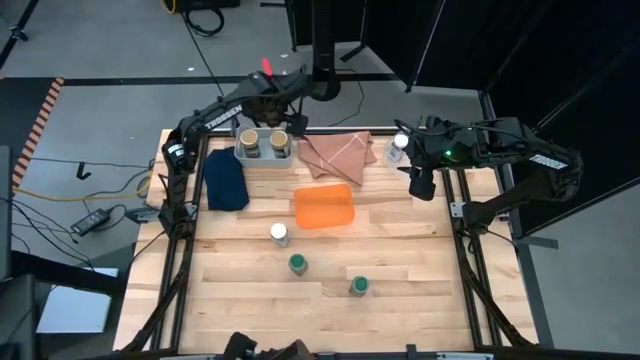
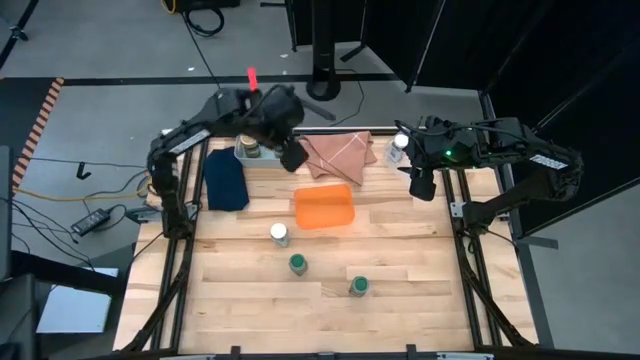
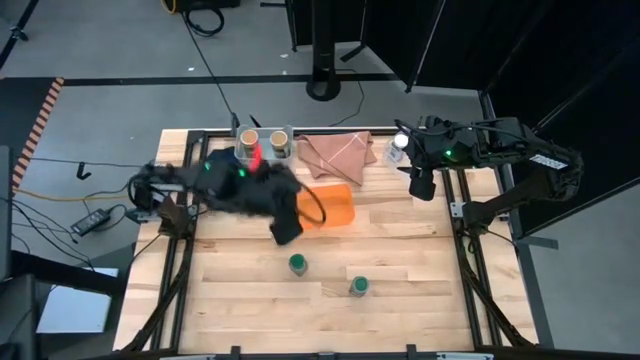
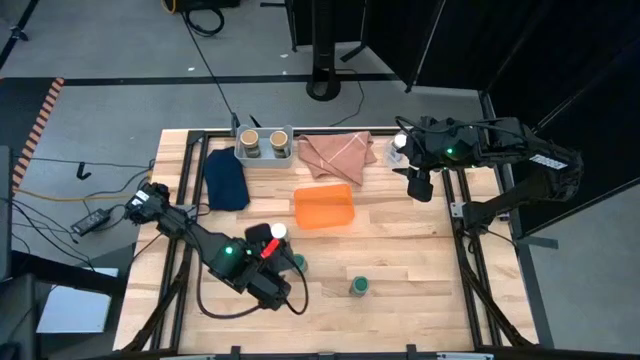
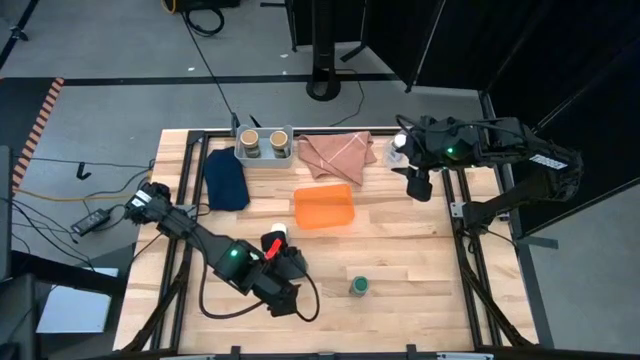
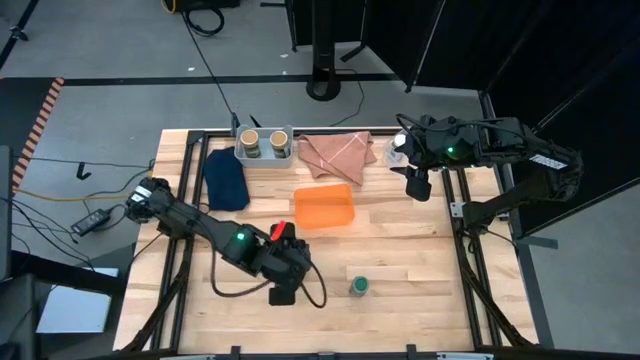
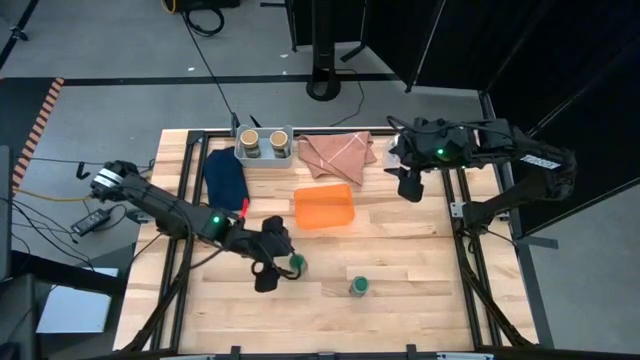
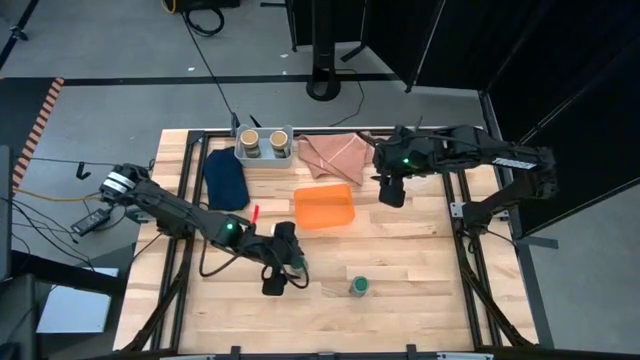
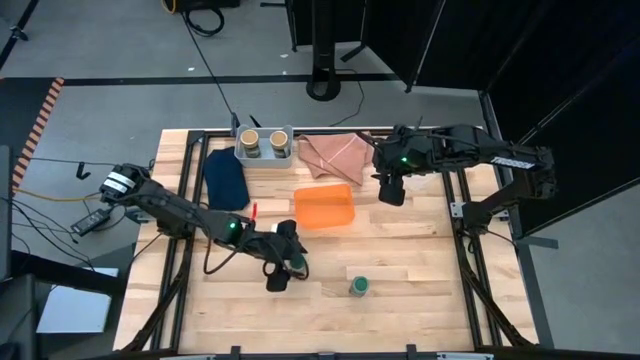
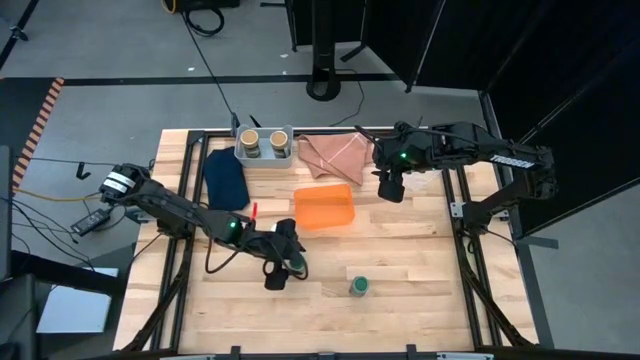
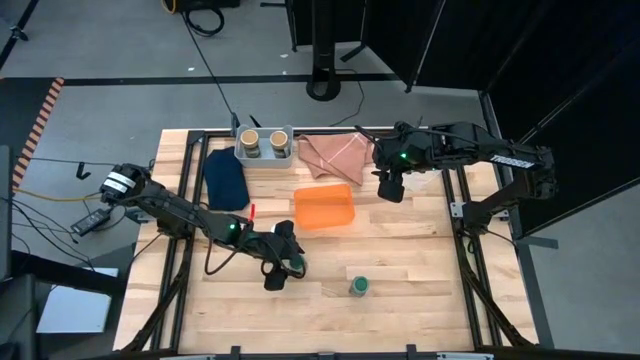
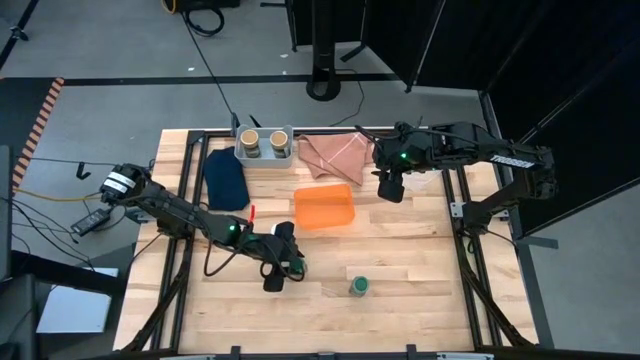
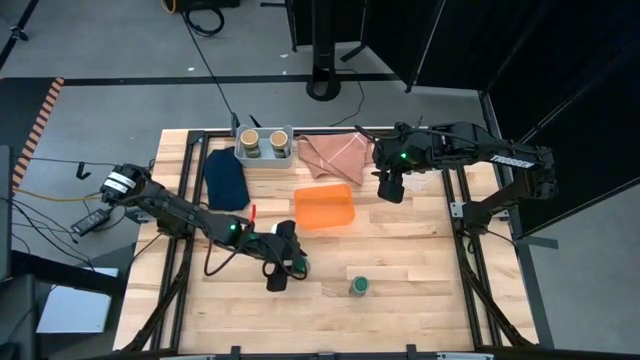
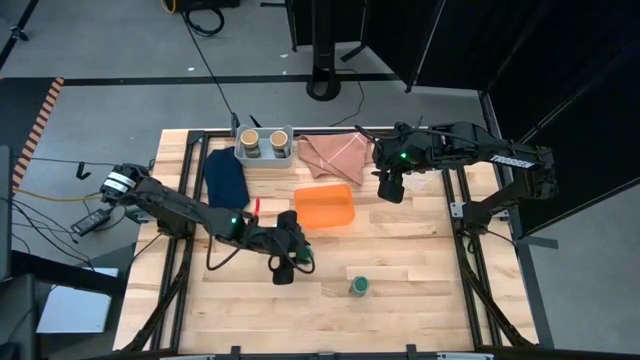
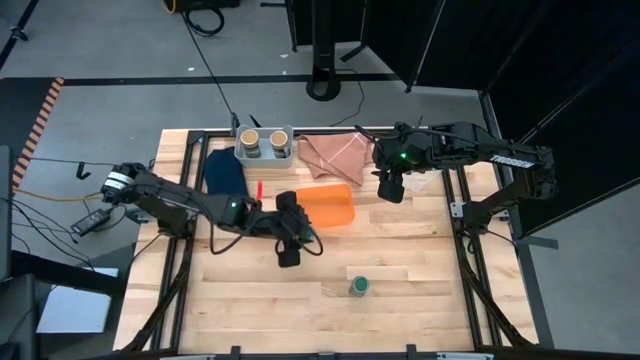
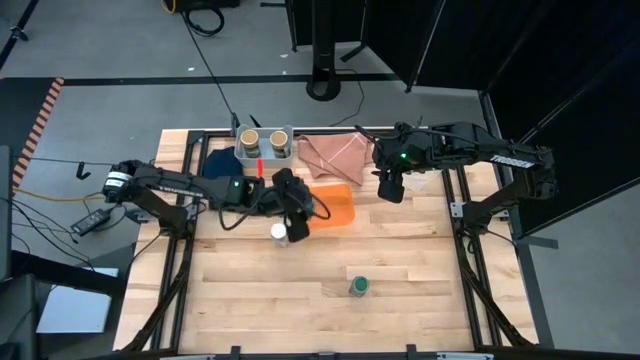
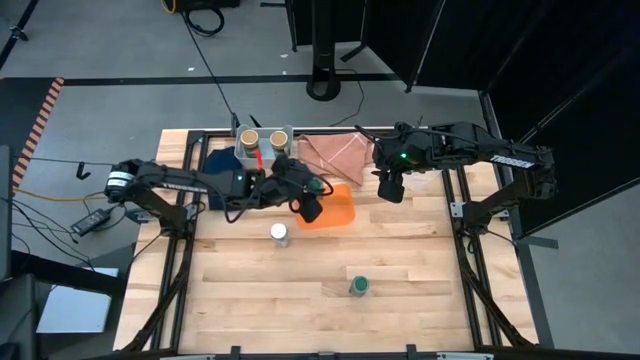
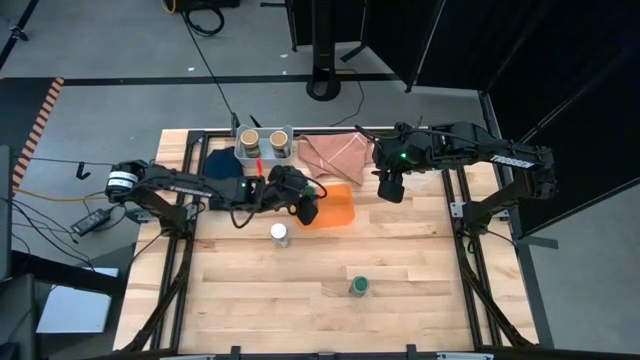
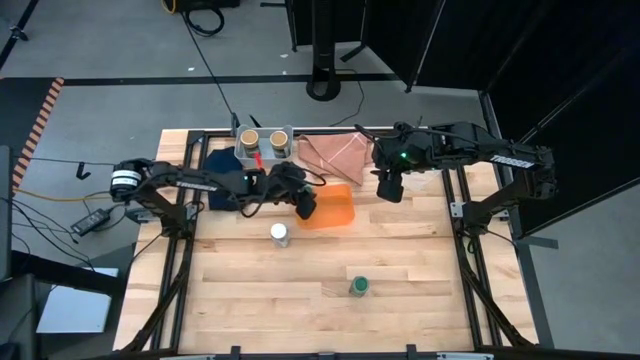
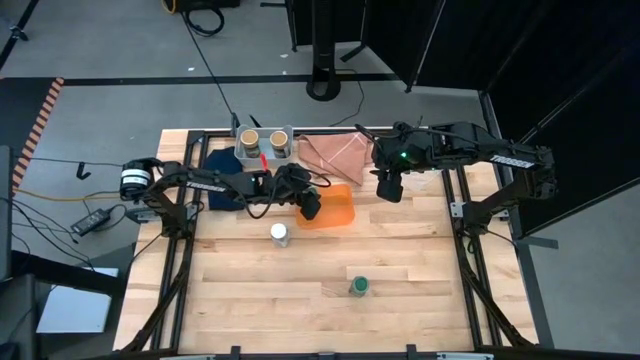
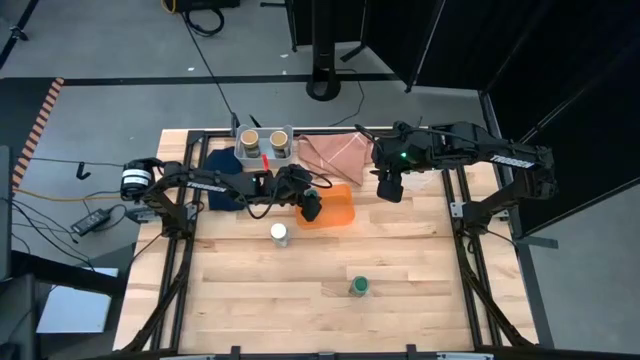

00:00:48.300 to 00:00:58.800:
Task: Sort spices by type
Put the green seasoning bottle into the orange bin

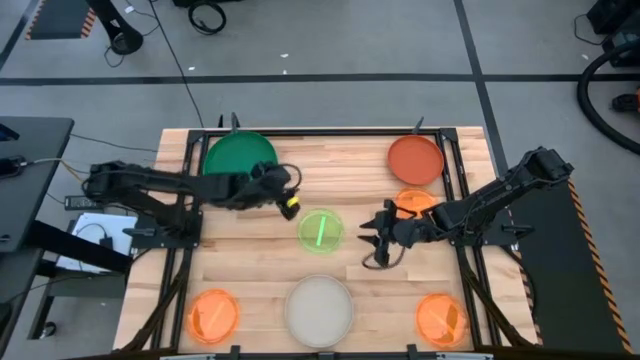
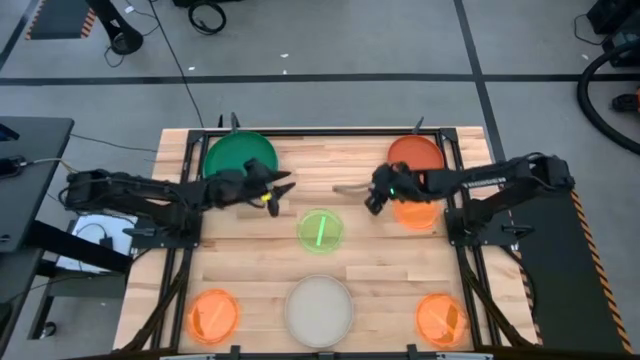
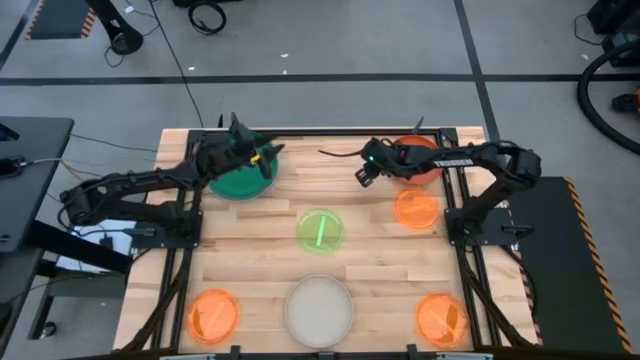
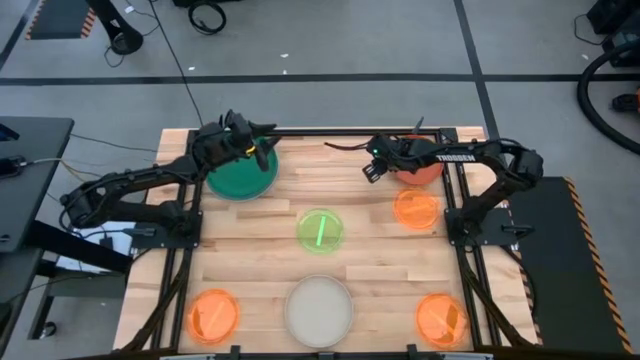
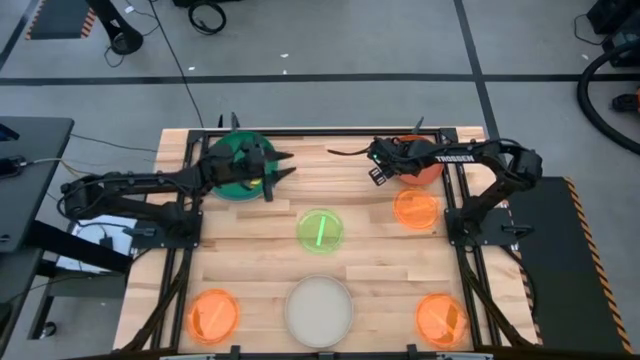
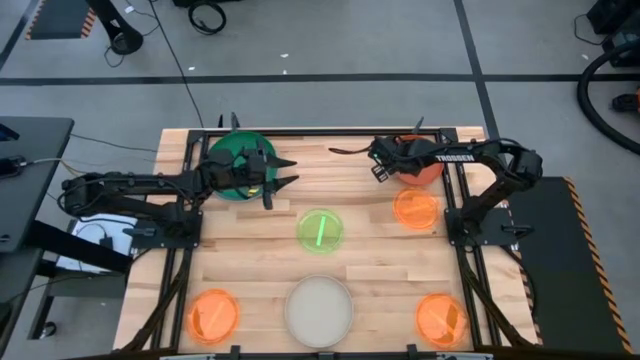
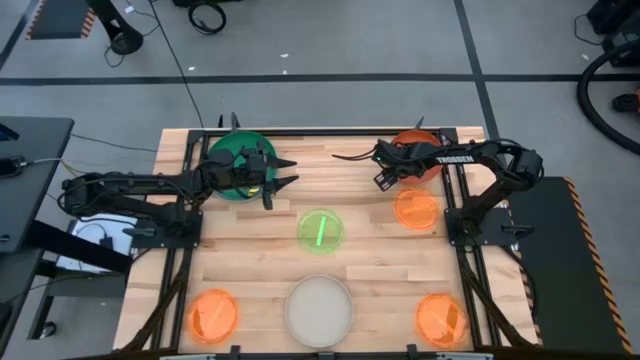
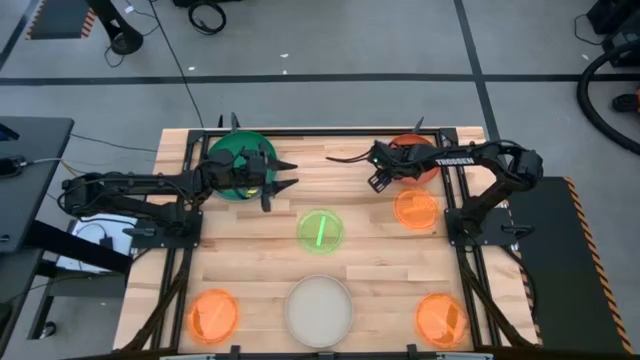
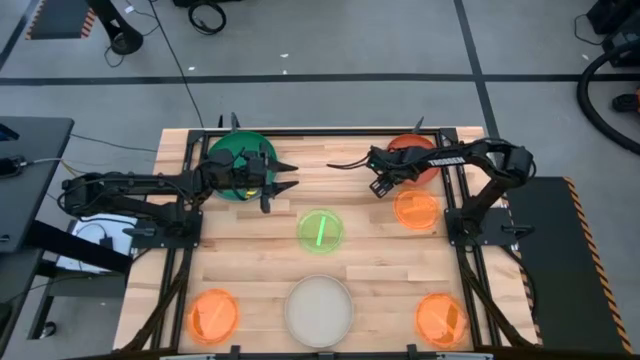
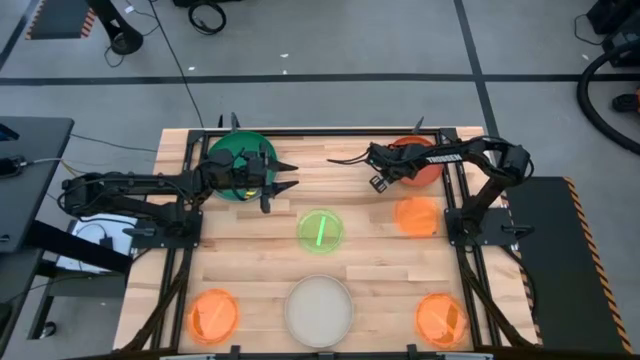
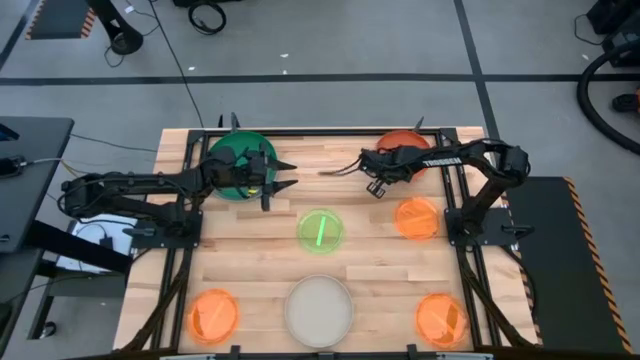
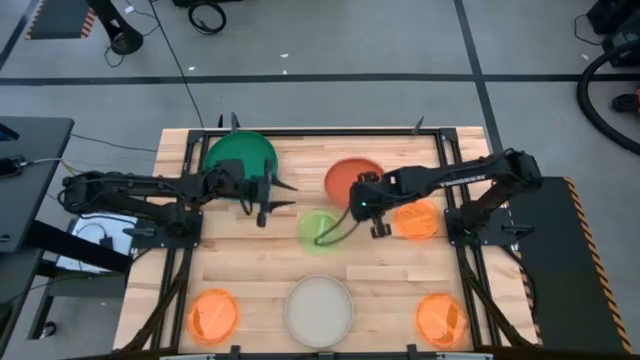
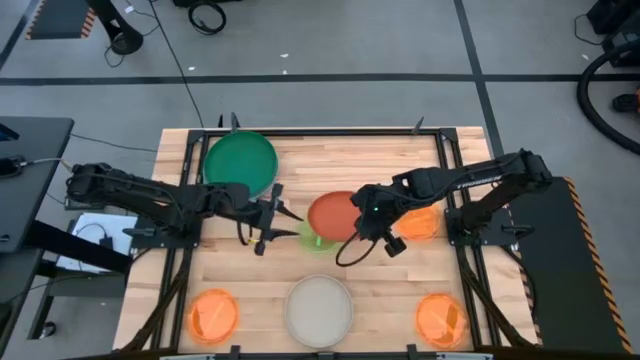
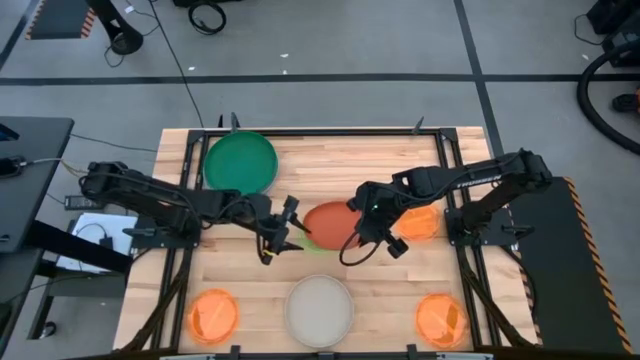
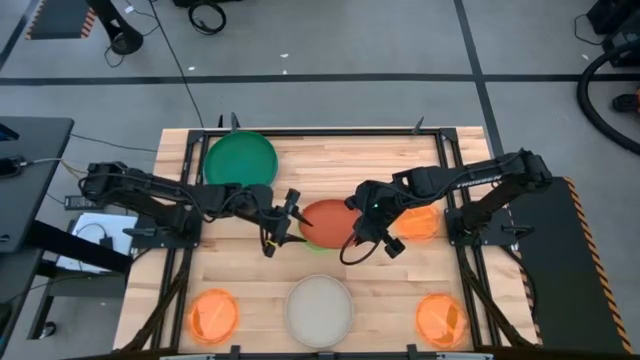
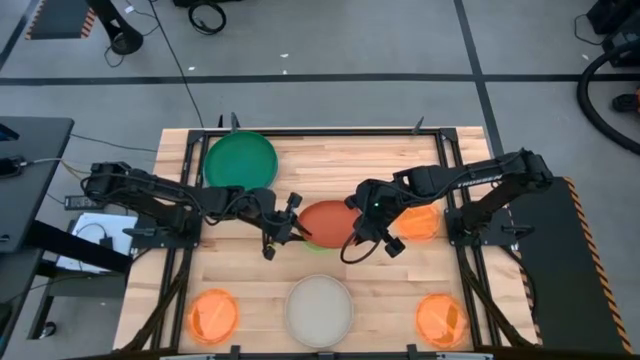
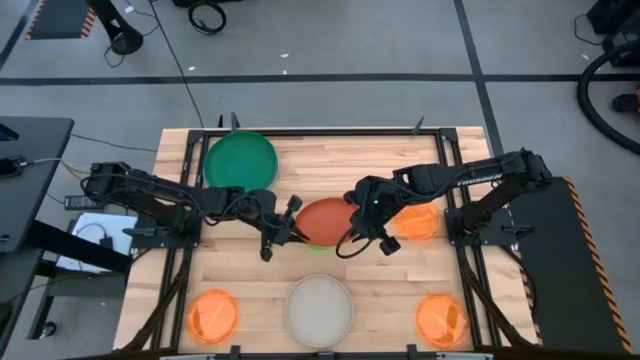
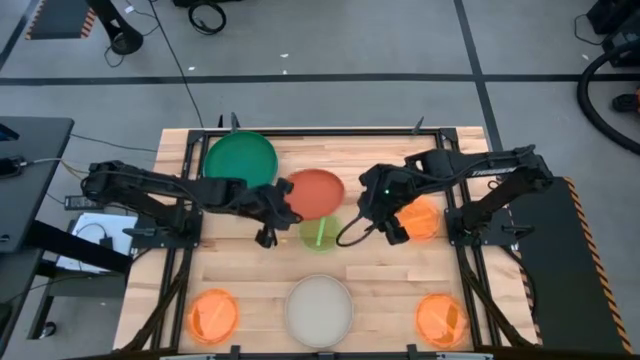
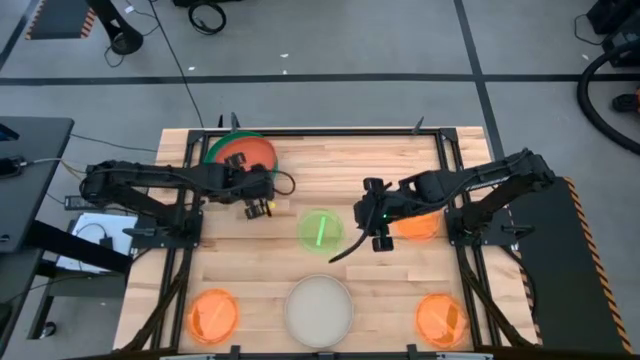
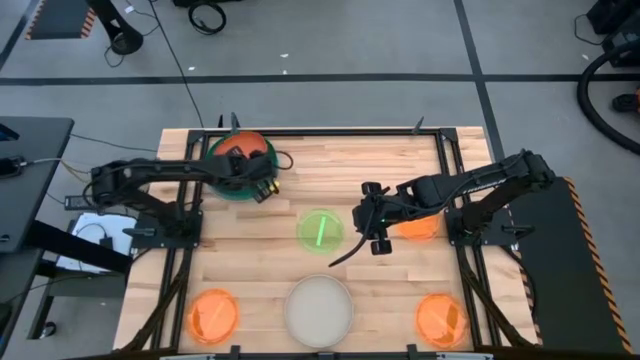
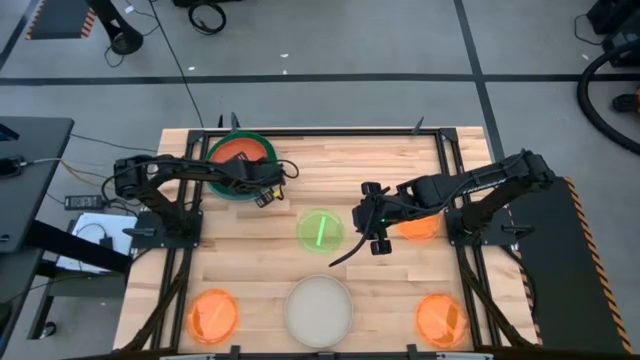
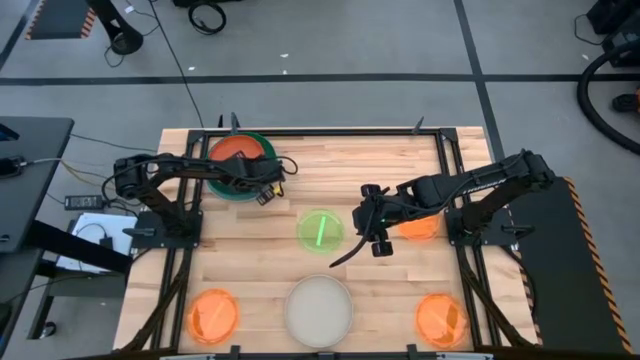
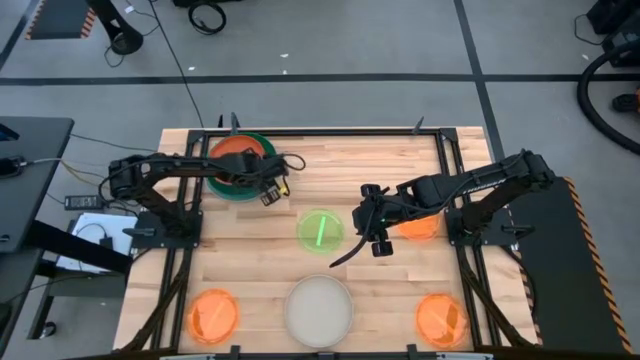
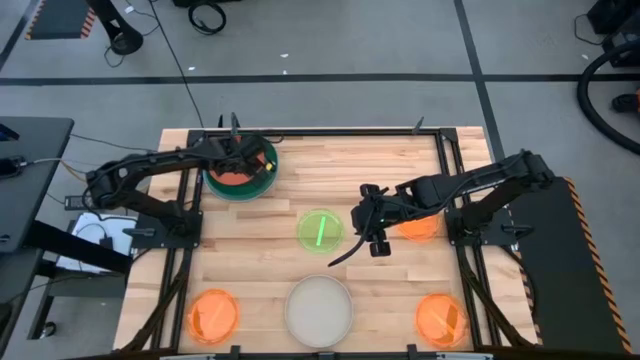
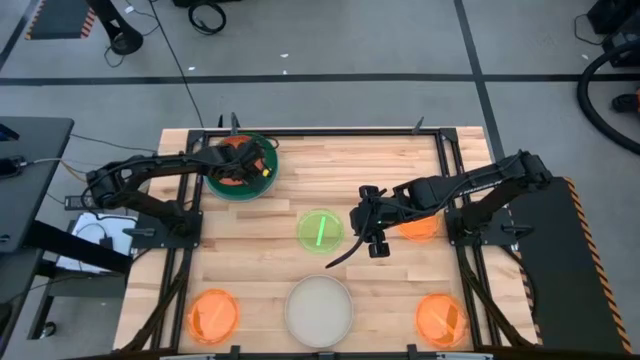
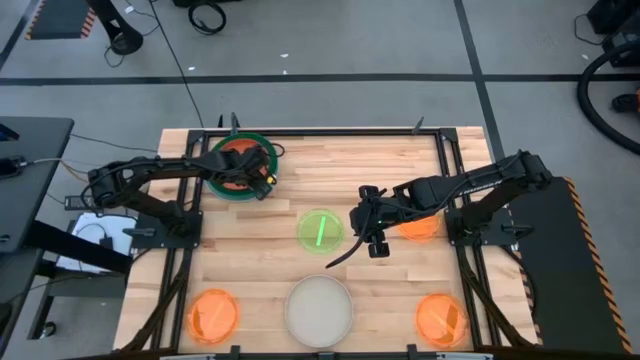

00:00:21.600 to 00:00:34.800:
Task: Stack plastic plates
Stack the orange plate on top of the green plate
